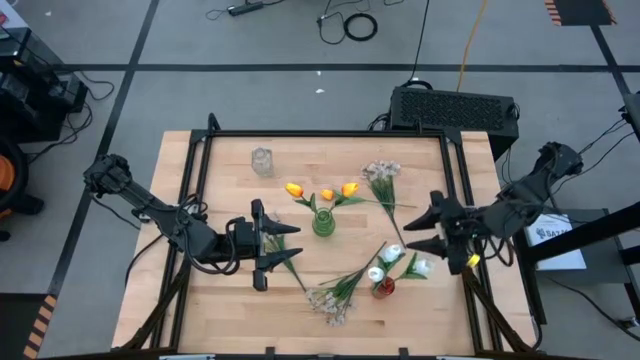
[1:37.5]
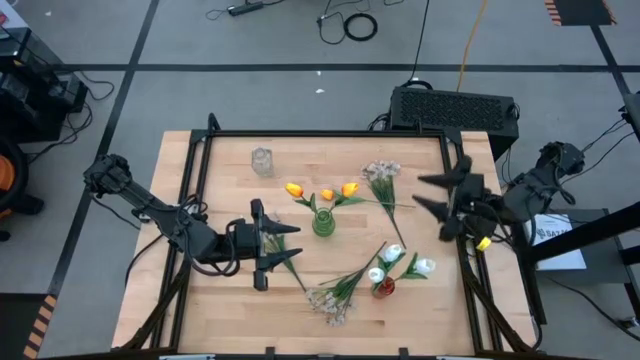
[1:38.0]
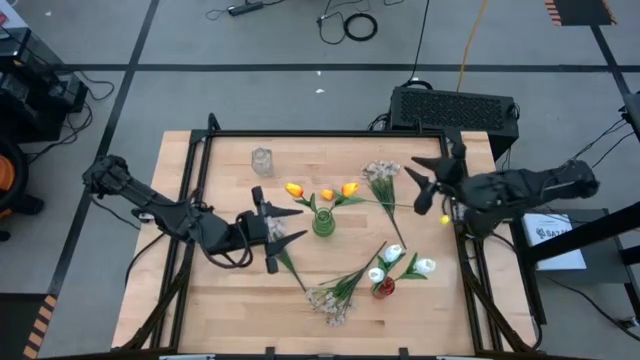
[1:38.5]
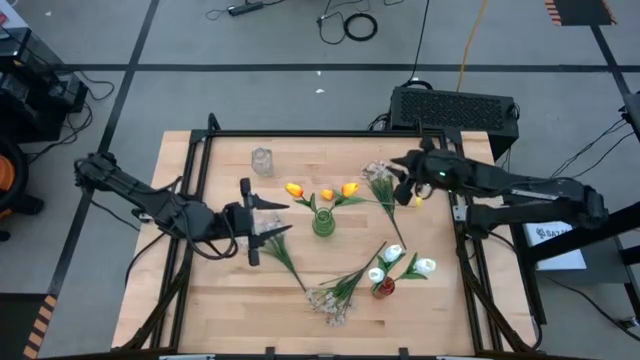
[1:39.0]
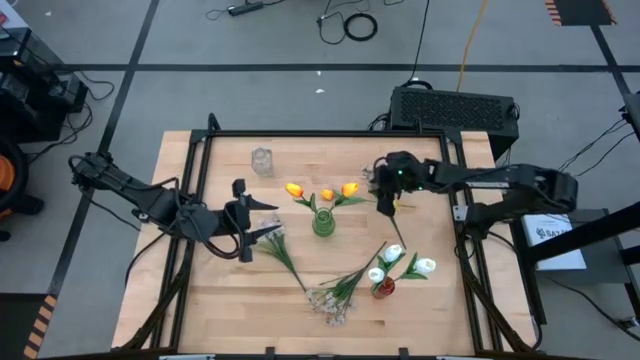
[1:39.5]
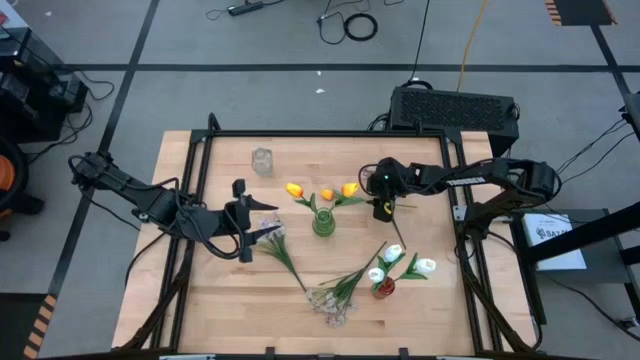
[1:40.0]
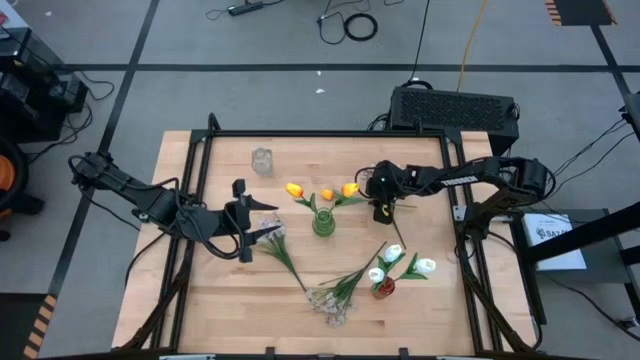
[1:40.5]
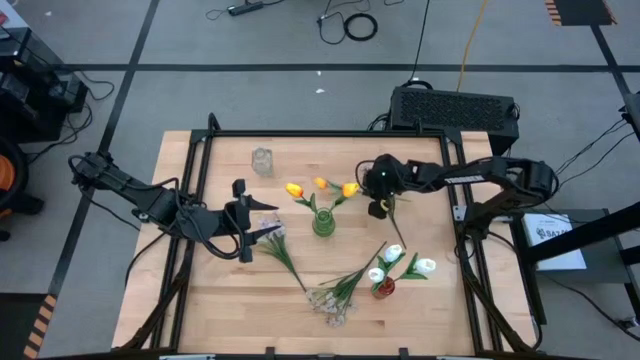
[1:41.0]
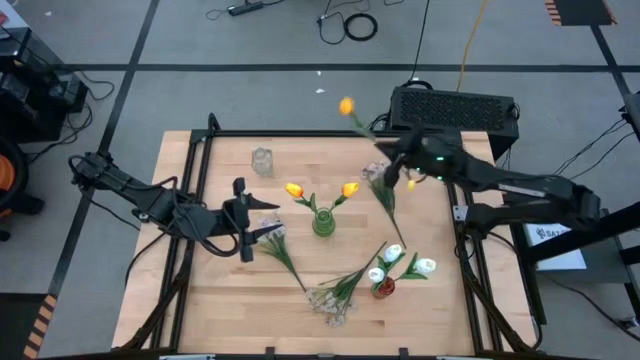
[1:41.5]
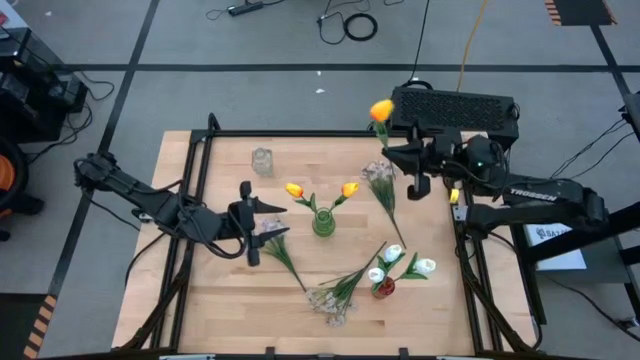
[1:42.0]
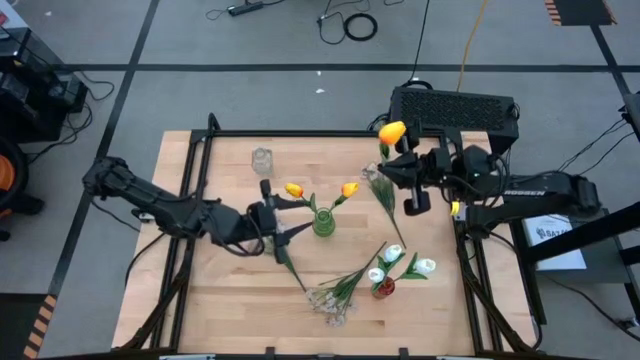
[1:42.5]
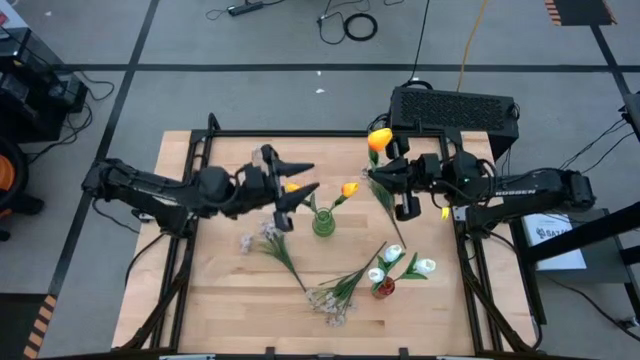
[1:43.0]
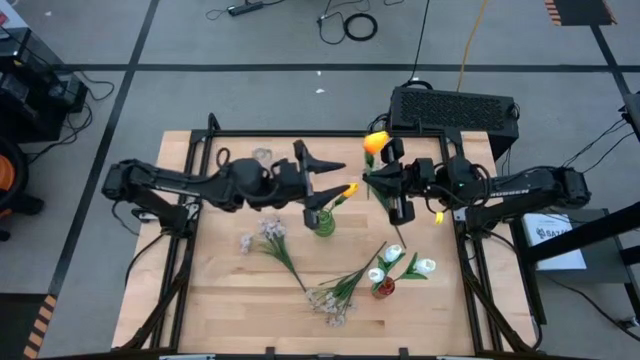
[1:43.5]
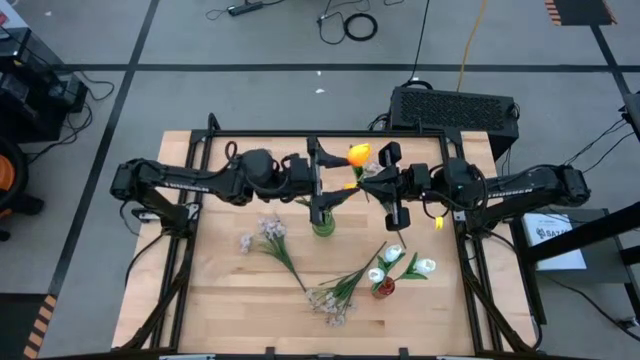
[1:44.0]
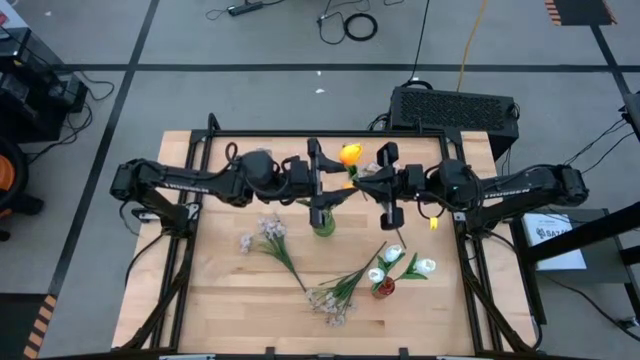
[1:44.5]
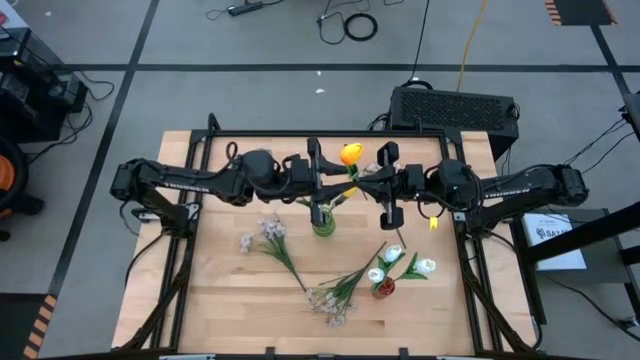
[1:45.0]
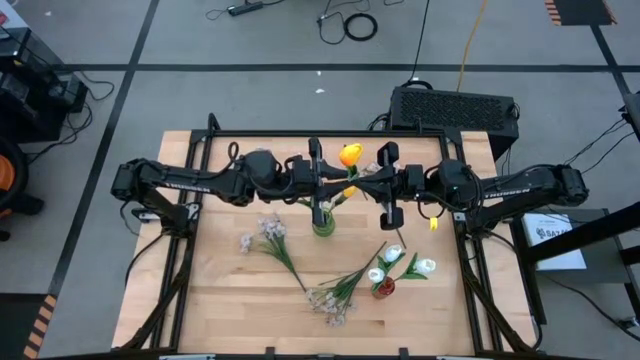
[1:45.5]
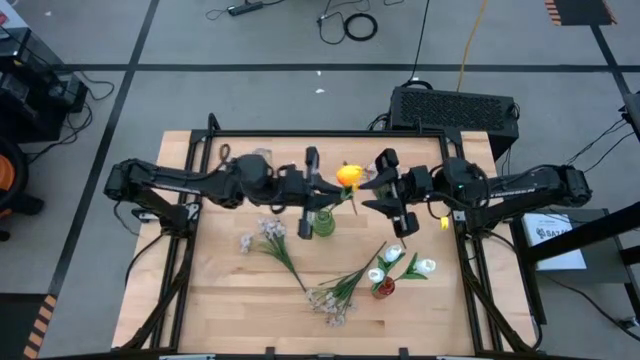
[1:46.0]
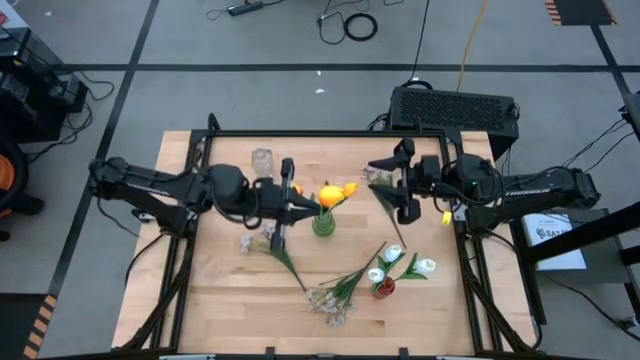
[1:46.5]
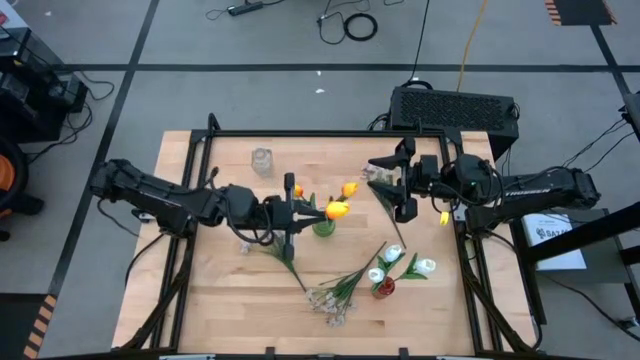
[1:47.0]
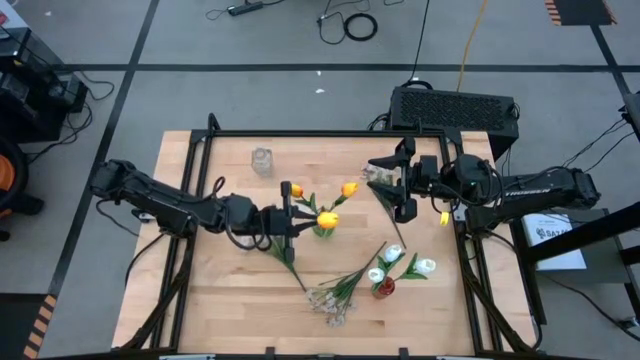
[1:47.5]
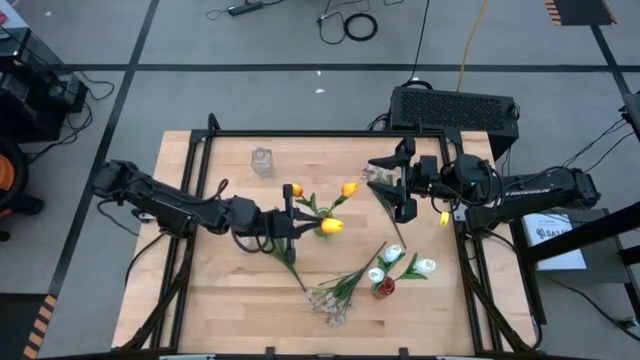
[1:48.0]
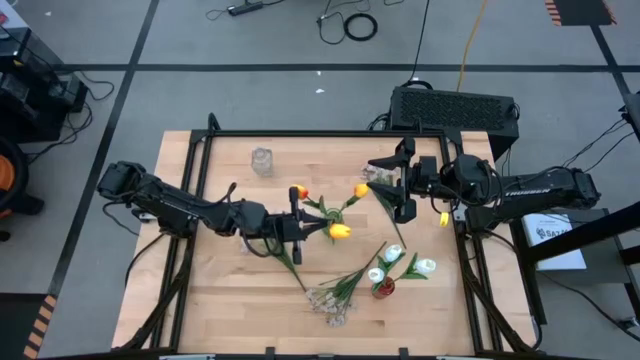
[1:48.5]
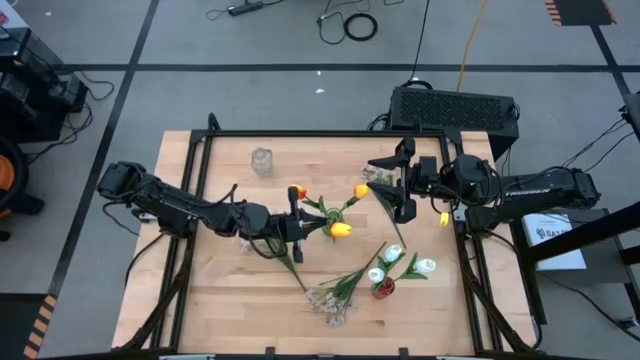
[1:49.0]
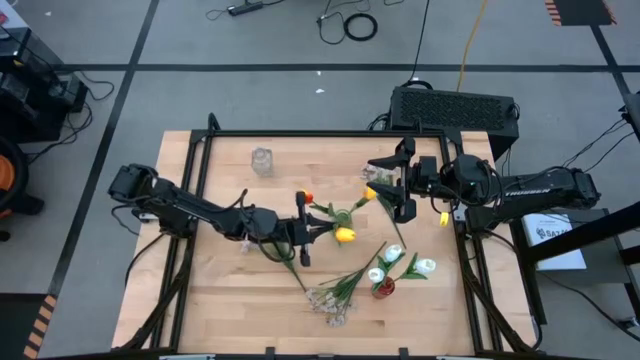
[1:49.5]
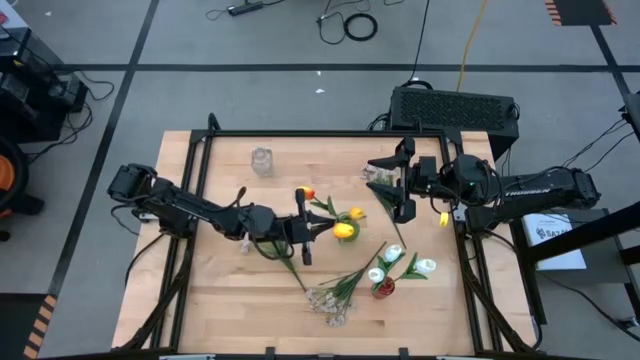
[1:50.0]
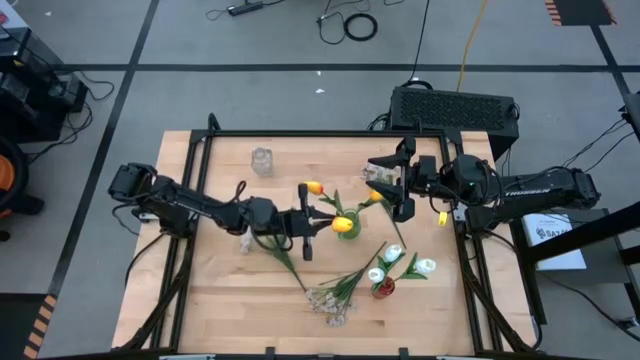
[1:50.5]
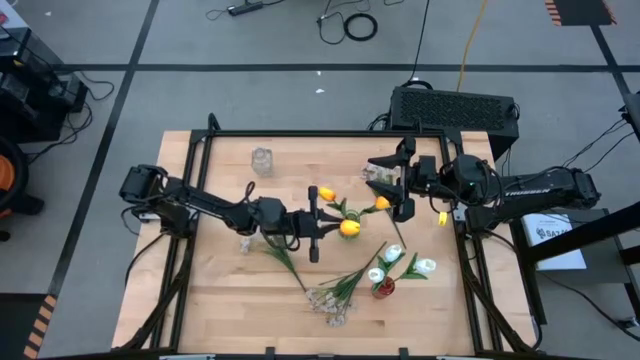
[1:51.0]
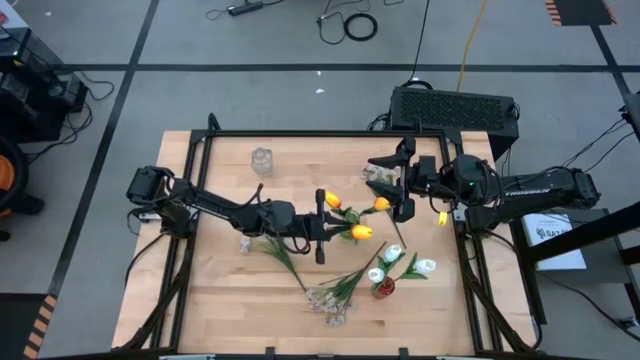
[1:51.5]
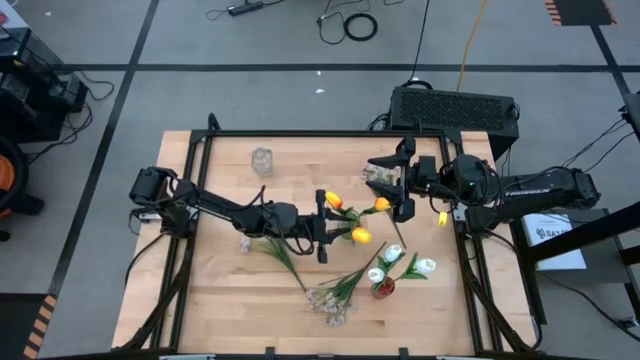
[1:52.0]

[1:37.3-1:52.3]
Task: Sort flowers into vase by color
Put the yellow tulip into the green vase

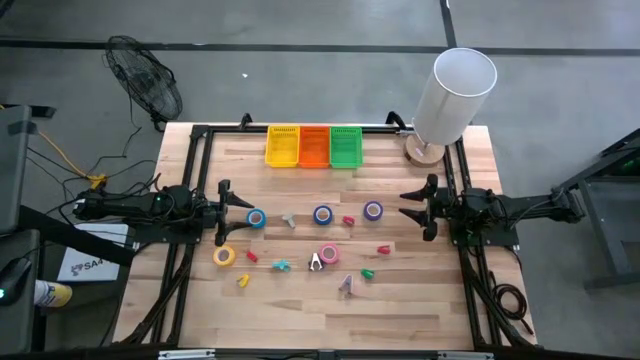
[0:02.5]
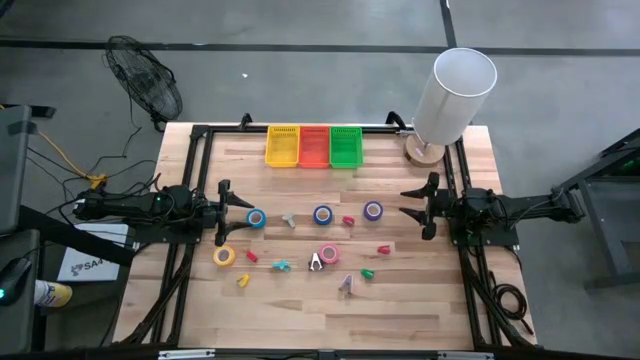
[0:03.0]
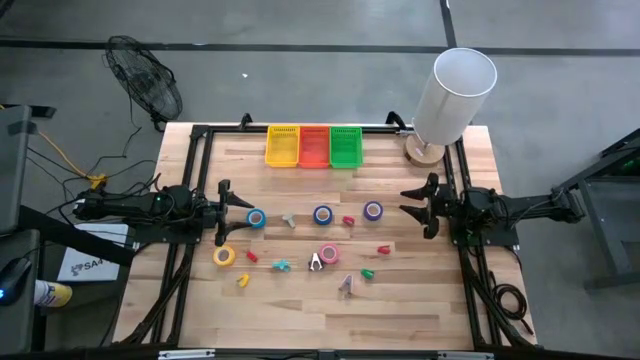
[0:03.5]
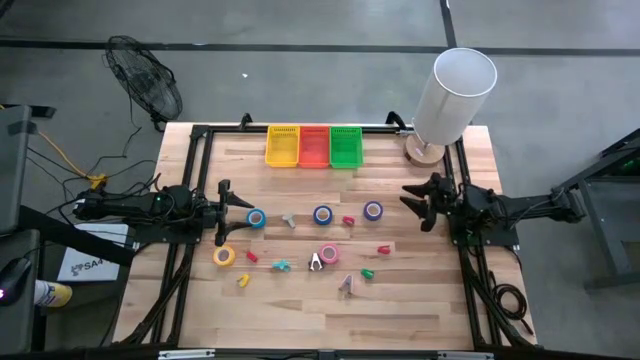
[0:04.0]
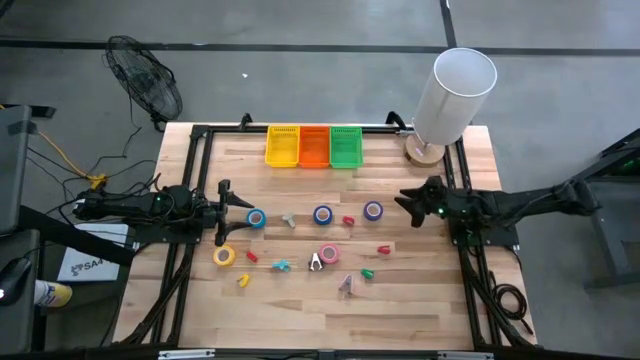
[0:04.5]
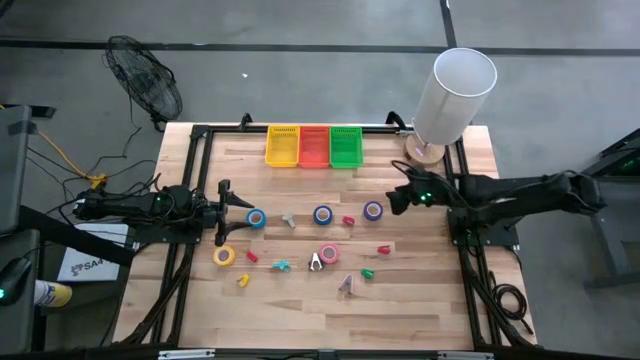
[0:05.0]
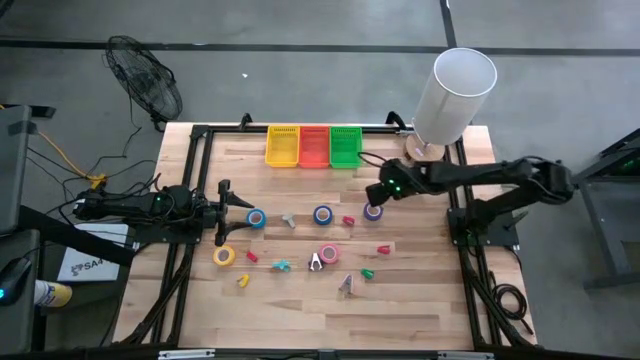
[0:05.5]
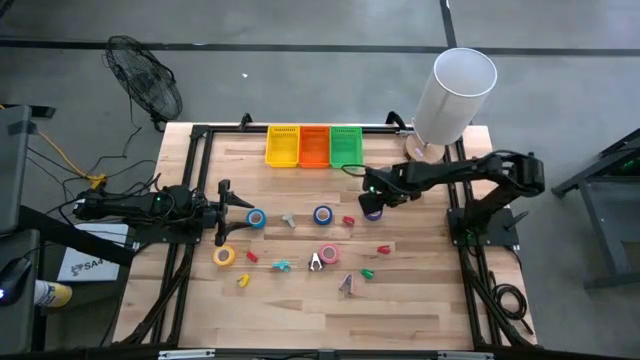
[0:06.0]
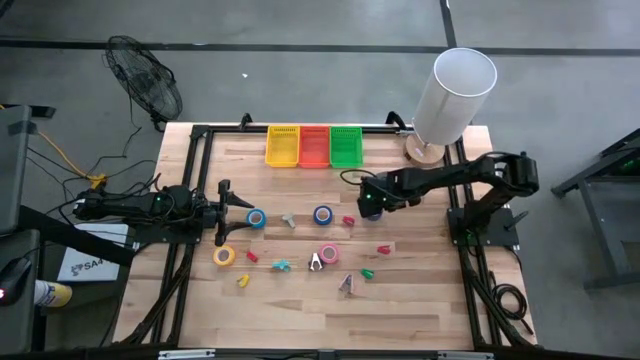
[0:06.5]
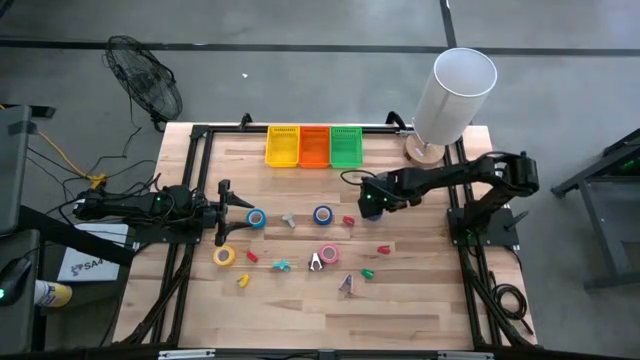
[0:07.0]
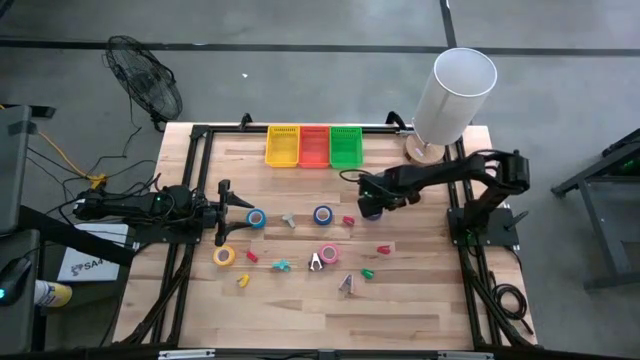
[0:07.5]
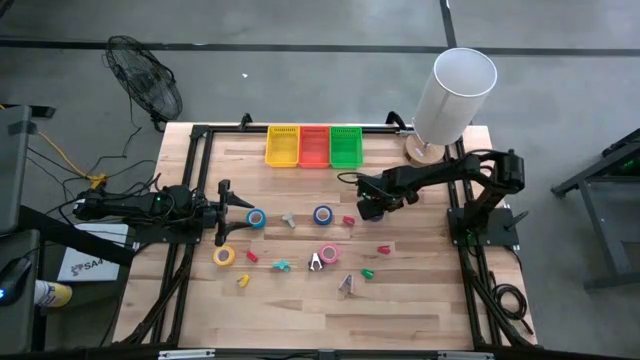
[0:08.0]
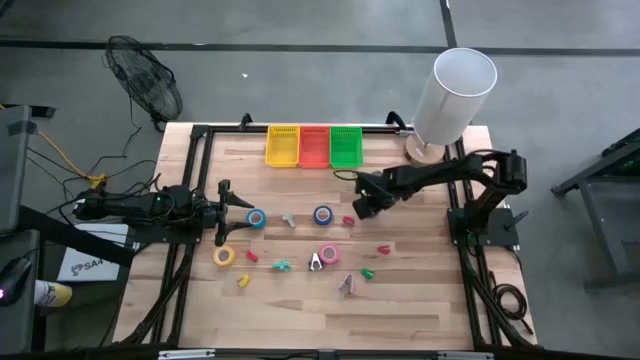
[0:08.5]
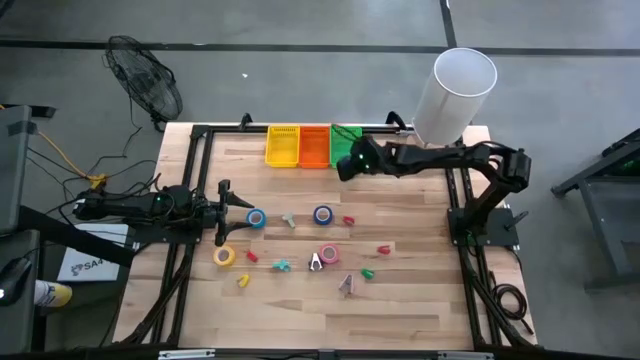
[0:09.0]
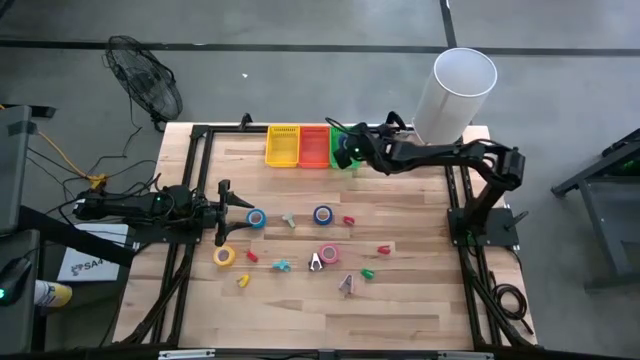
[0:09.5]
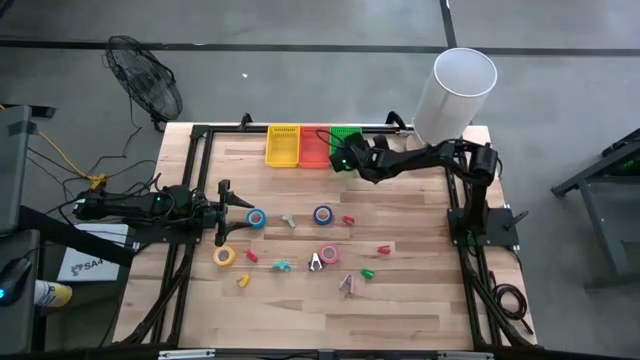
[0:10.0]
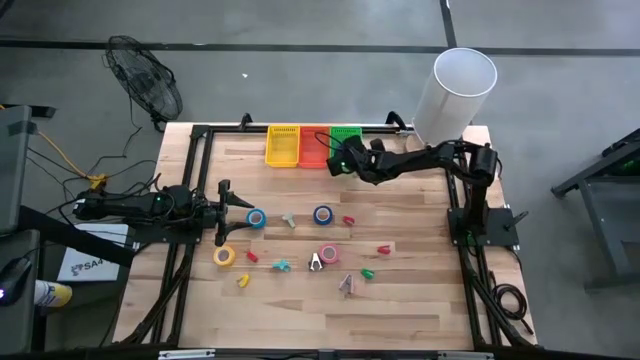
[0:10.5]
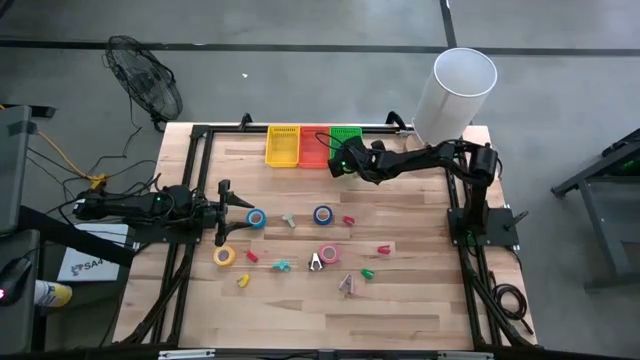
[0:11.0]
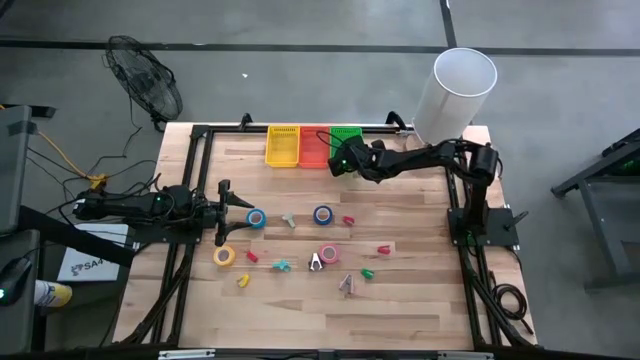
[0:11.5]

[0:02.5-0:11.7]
Task: Pick and place Stapler, Stapler remover, tape
Put the violet tape into the green basket
